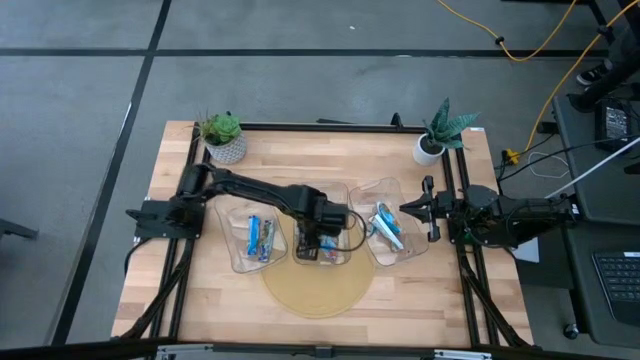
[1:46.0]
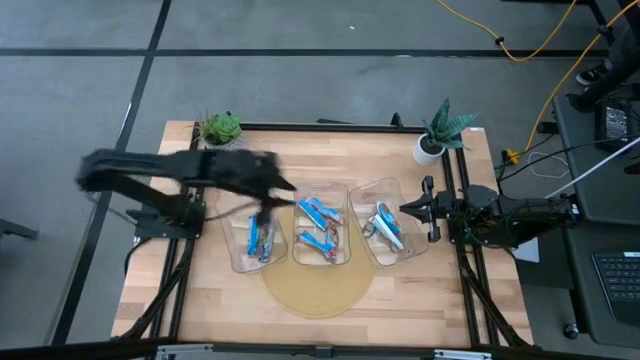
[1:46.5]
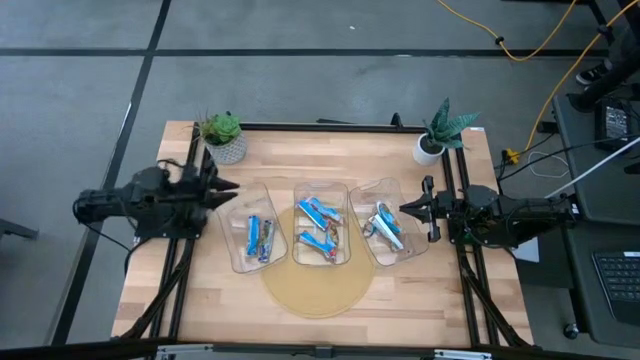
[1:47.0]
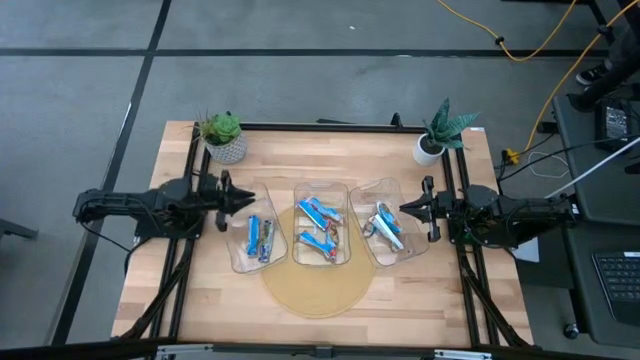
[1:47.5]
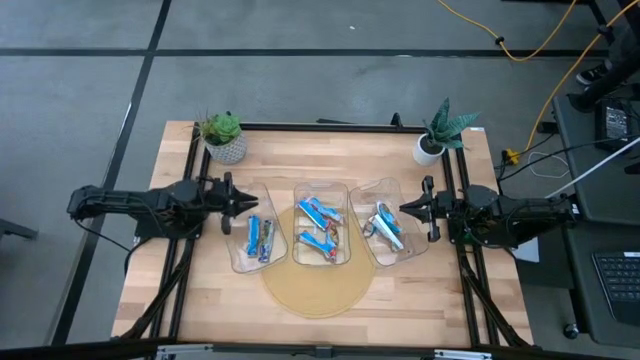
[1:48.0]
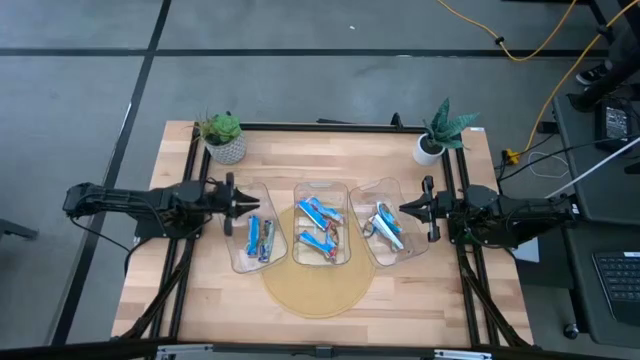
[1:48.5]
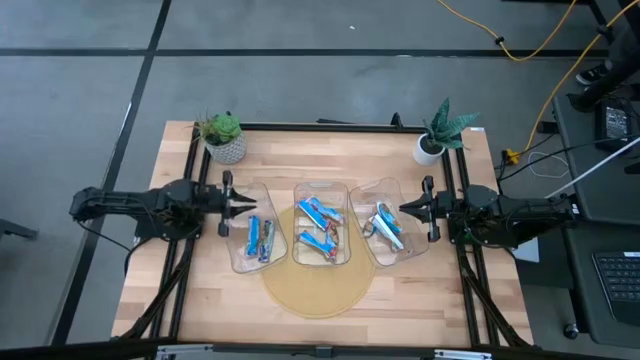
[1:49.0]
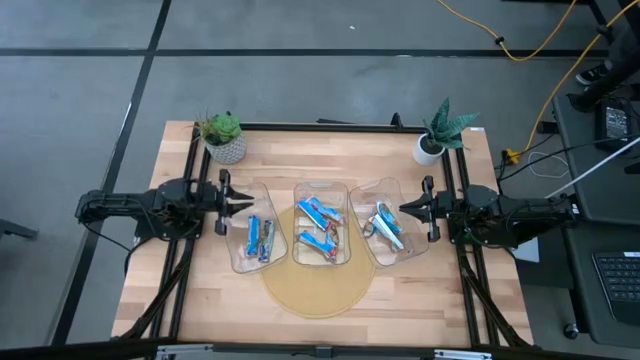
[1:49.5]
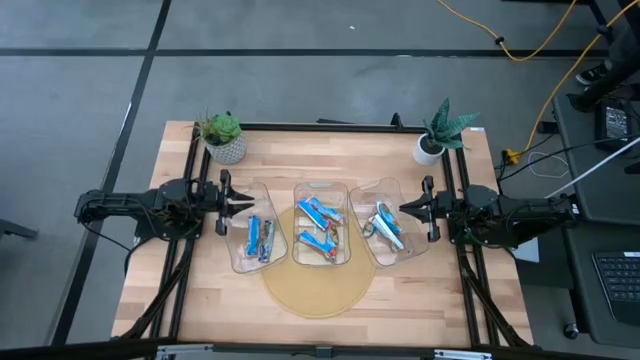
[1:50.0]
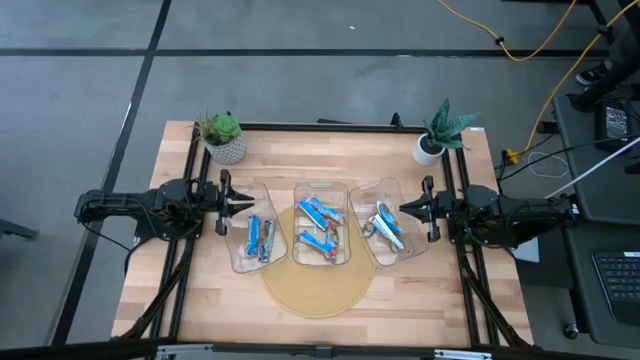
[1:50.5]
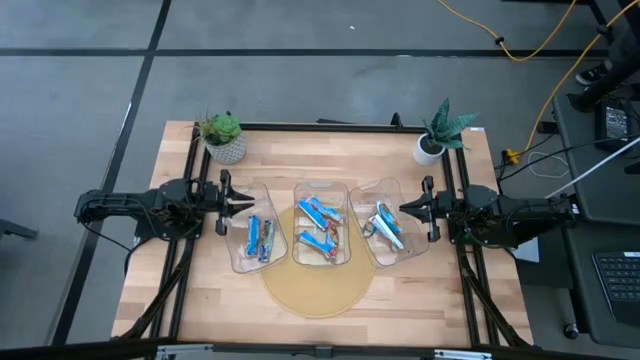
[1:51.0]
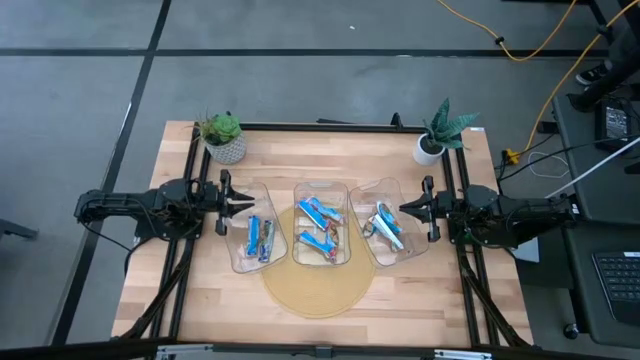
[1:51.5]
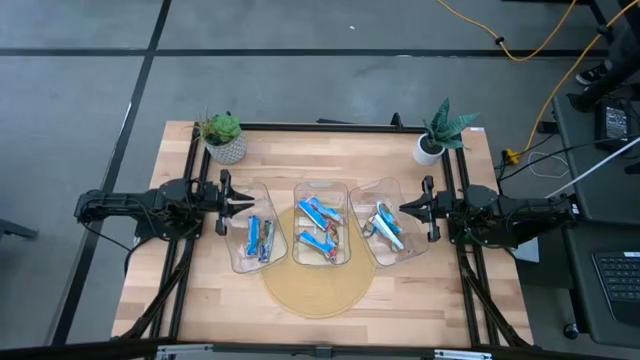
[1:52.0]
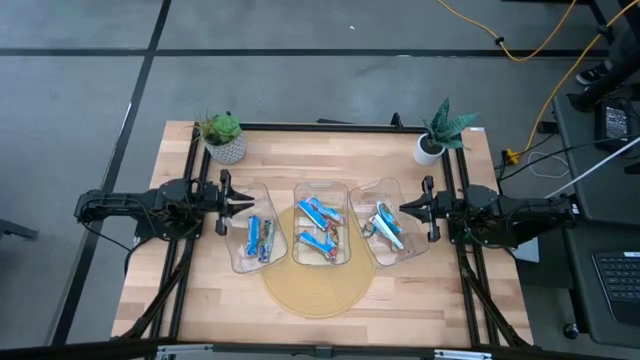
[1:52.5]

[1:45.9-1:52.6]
Task: Pick and place Granola Bars by type
Return to Home Position

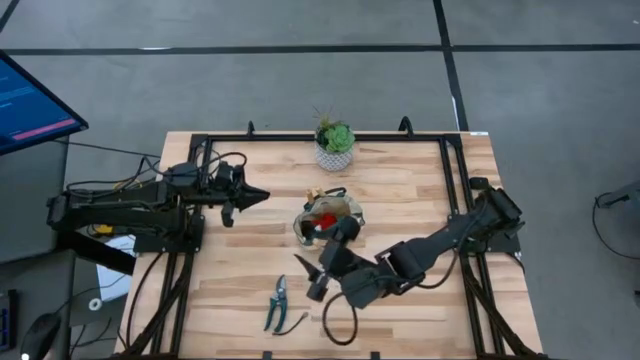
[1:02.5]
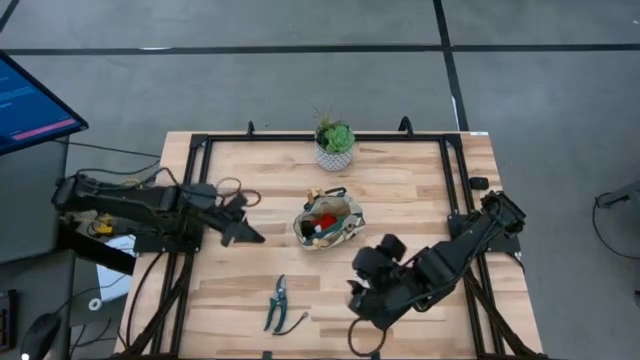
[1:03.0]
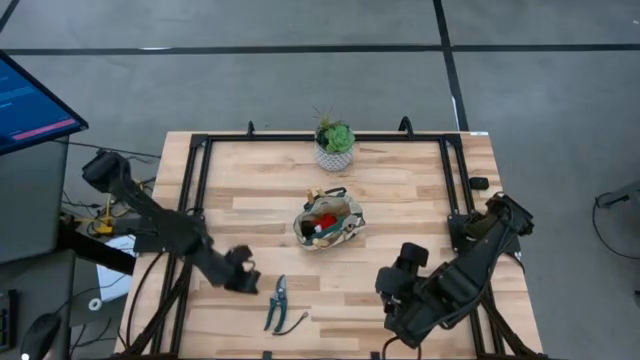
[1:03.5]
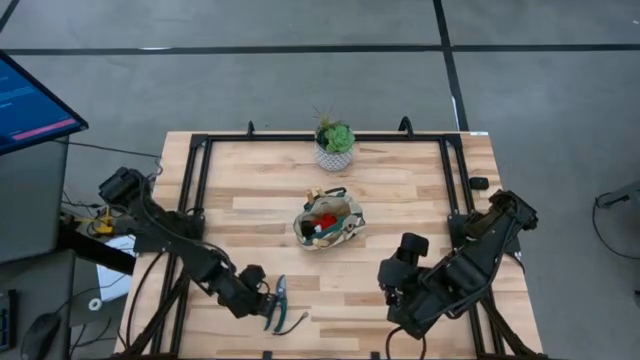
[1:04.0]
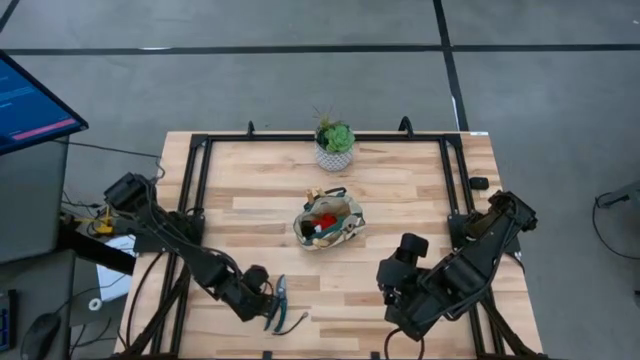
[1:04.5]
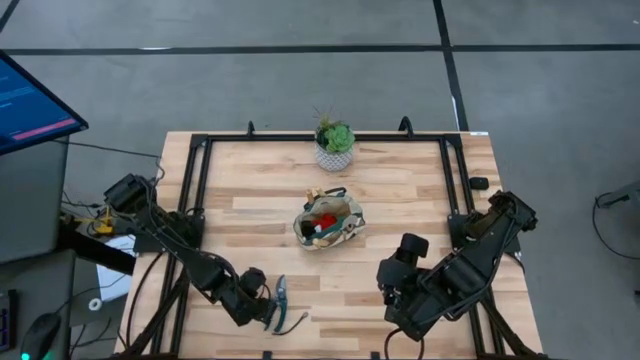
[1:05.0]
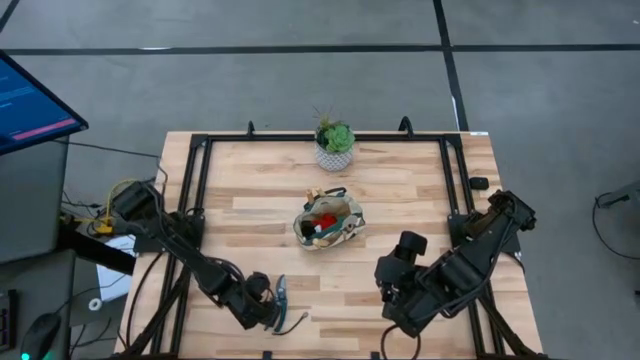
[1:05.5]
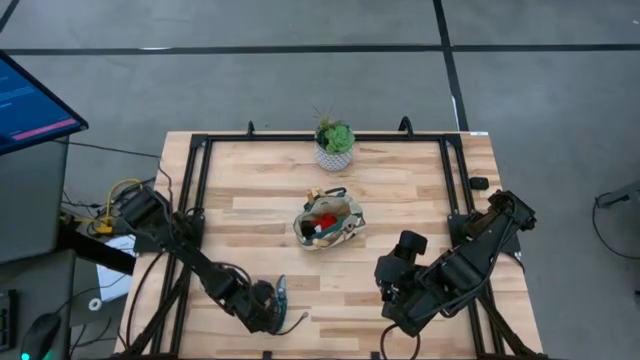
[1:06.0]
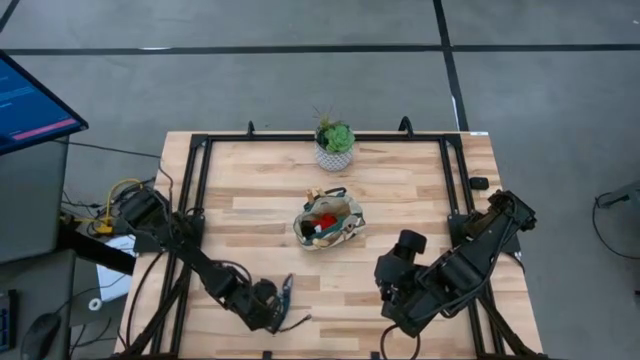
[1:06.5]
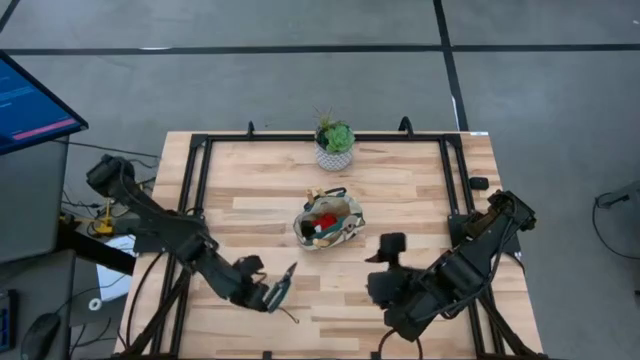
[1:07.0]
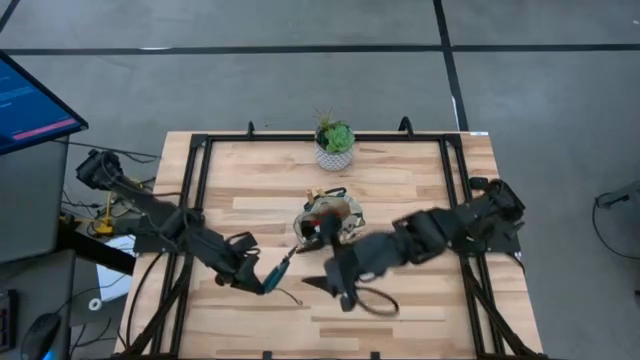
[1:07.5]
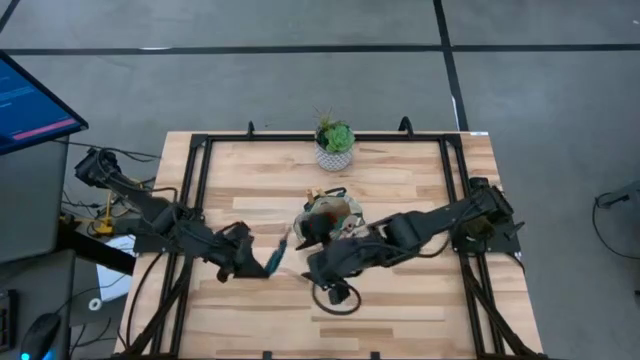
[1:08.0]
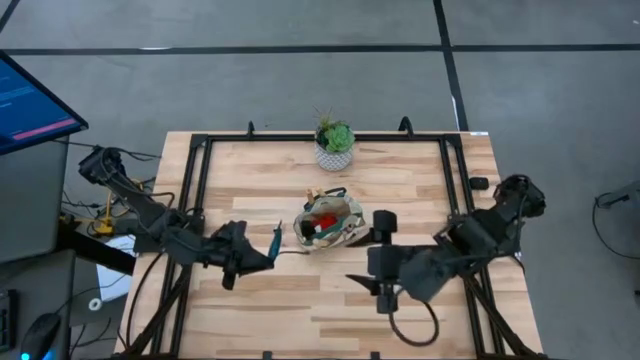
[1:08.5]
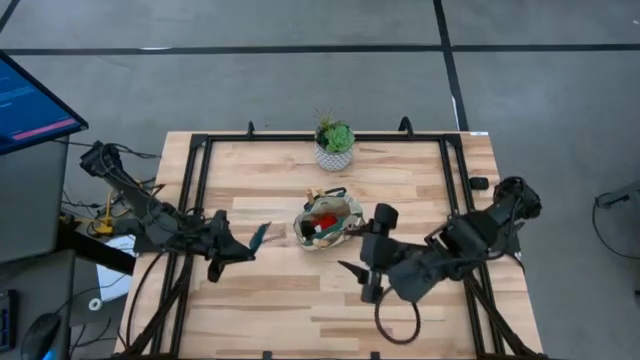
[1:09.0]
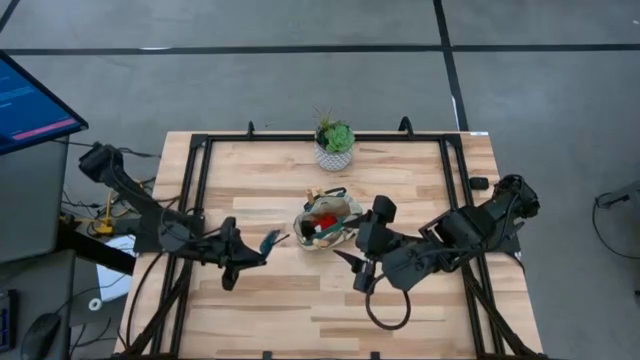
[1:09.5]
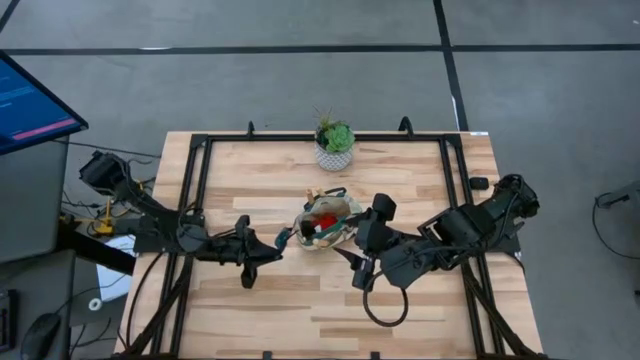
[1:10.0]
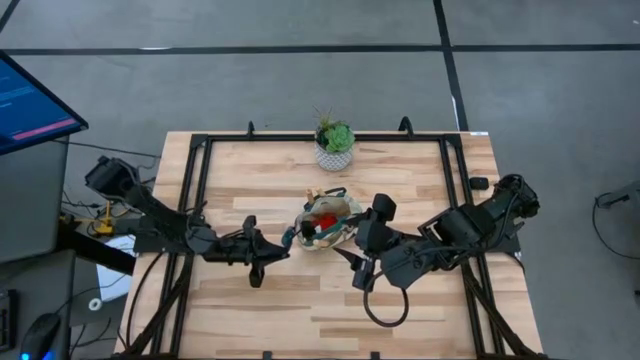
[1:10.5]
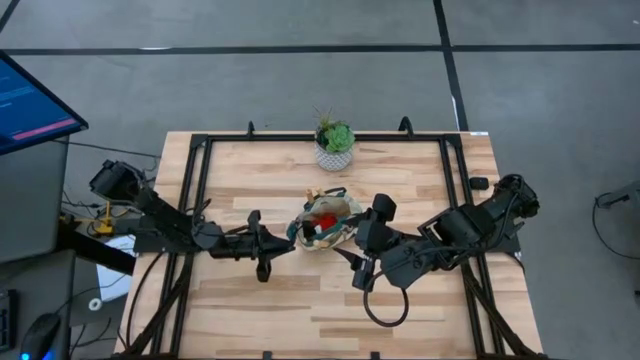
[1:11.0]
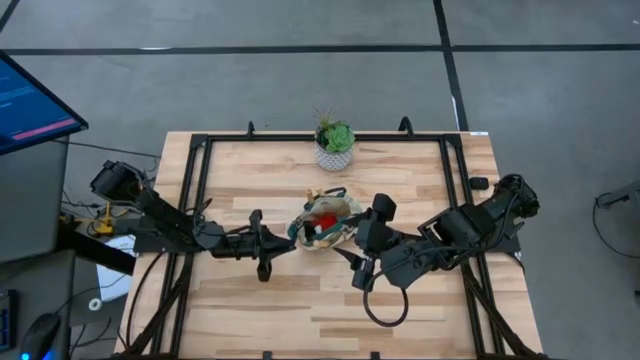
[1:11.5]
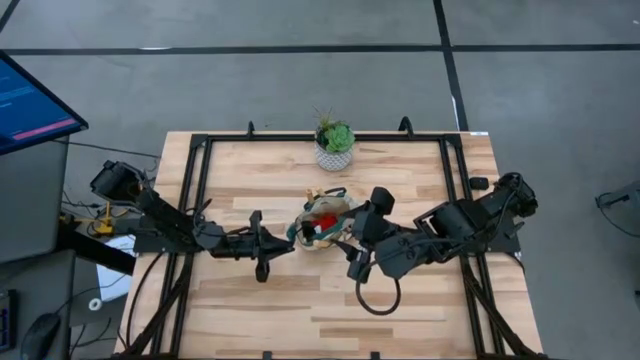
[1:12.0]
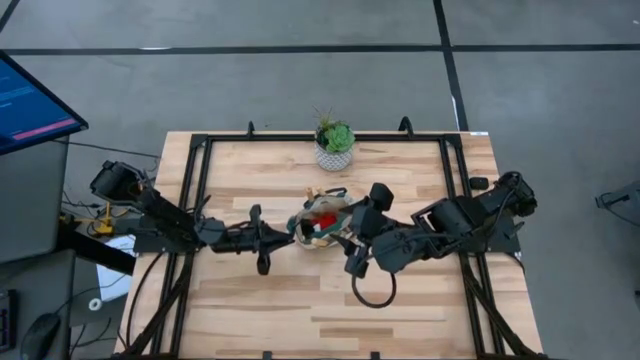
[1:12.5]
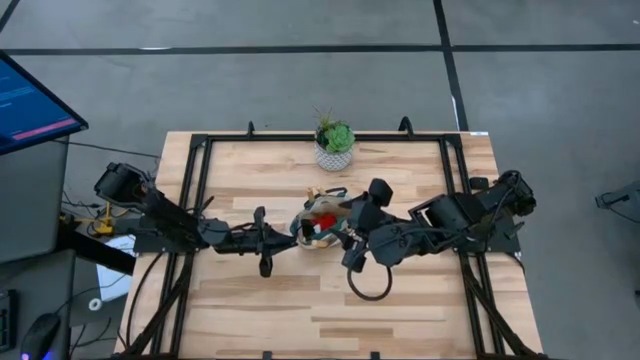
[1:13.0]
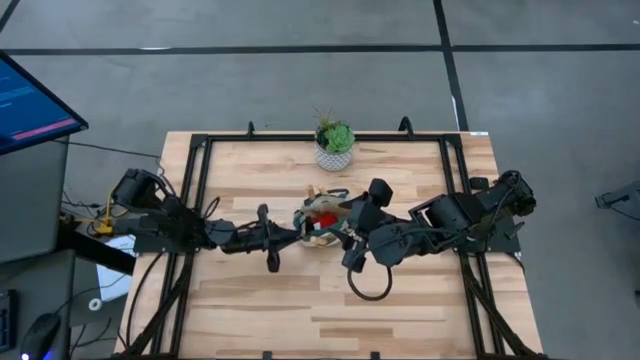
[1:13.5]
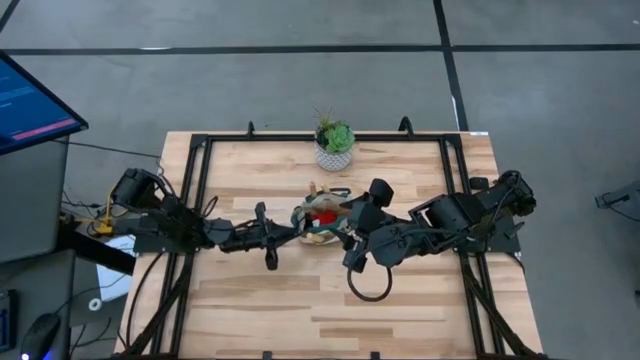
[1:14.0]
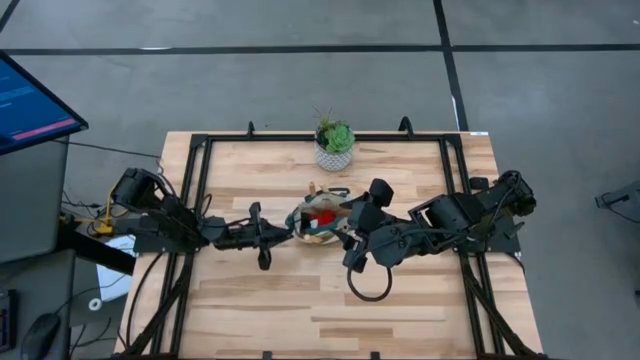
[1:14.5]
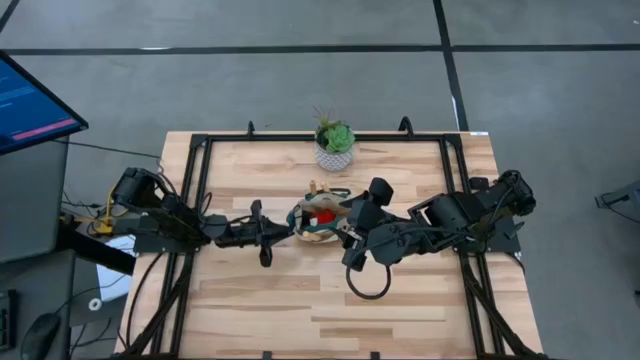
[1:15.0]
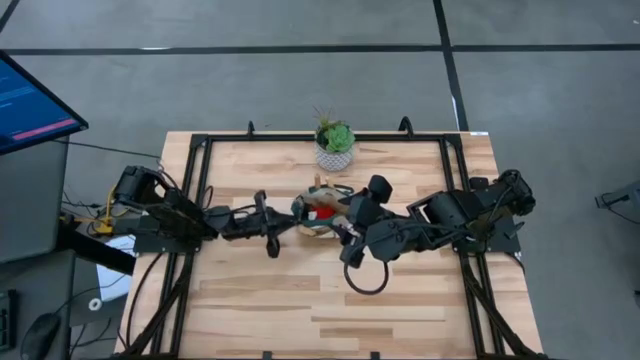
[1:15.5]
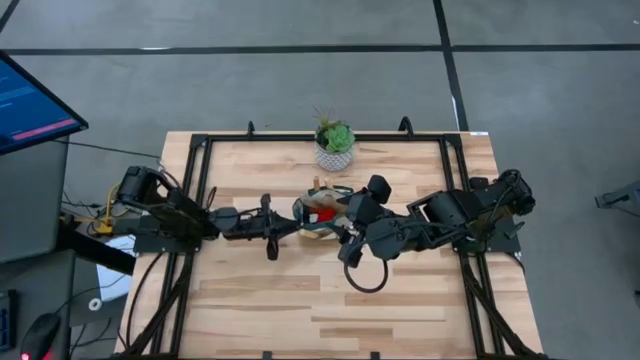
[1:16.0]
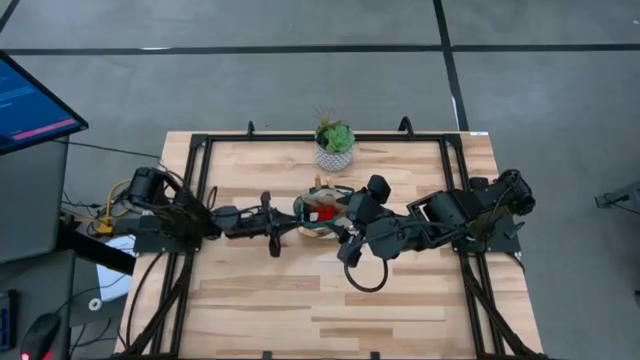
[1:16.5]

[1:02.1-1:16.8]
Task: Pick & Place Garden tools in Gardening bag
Put the shear scissor into the gardening bag
